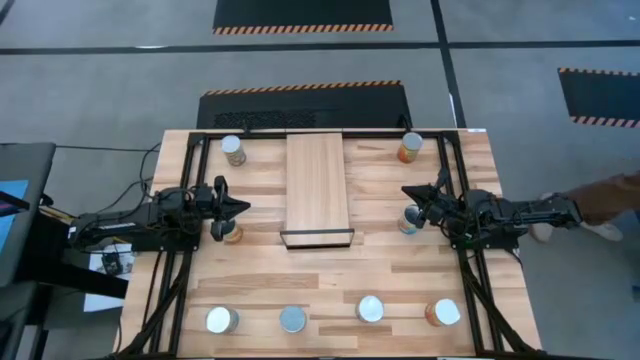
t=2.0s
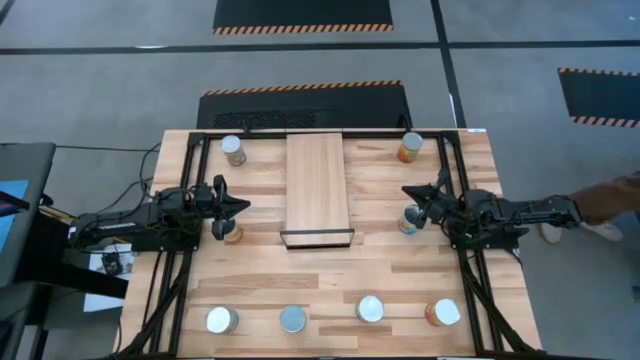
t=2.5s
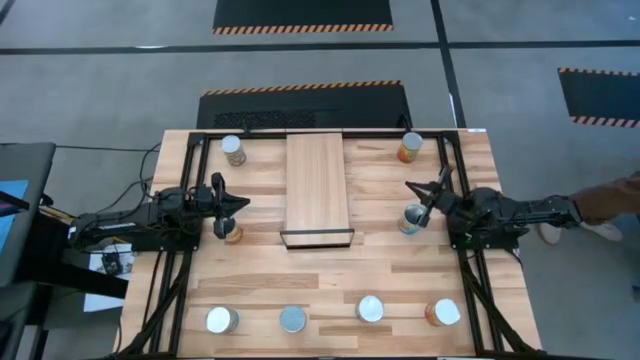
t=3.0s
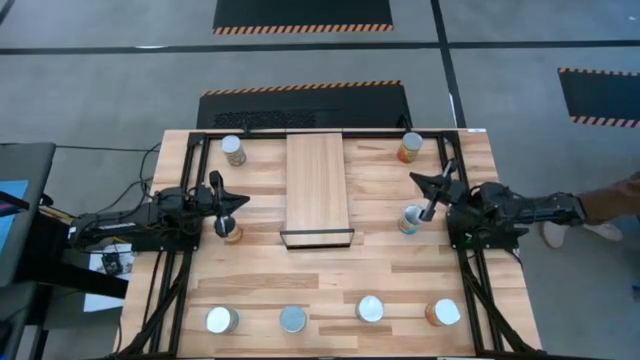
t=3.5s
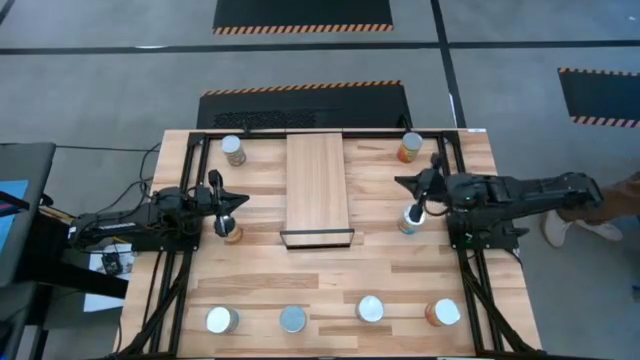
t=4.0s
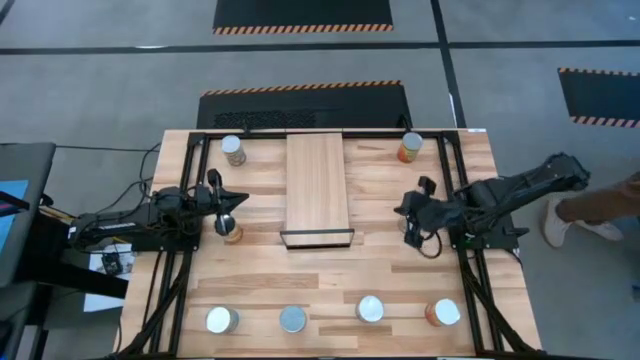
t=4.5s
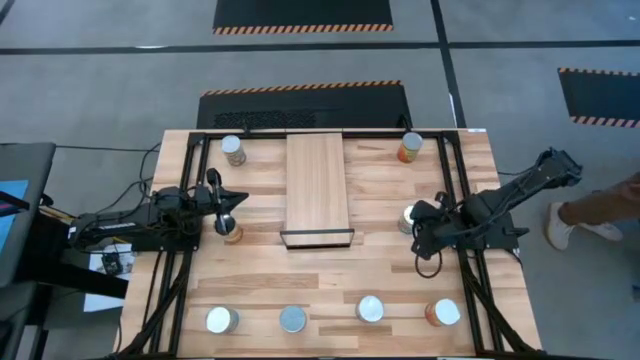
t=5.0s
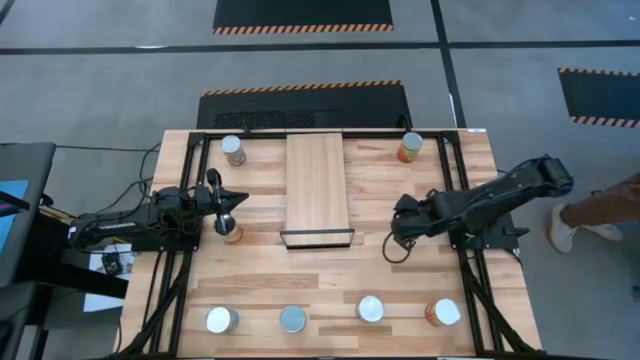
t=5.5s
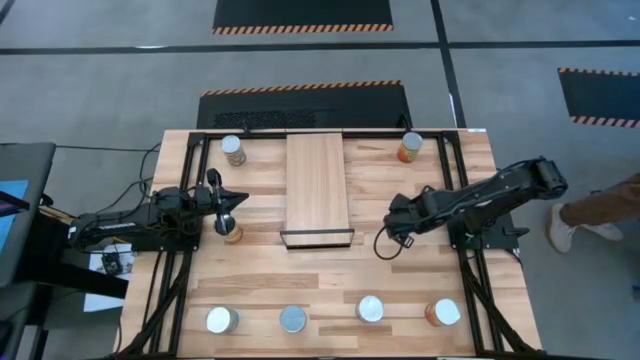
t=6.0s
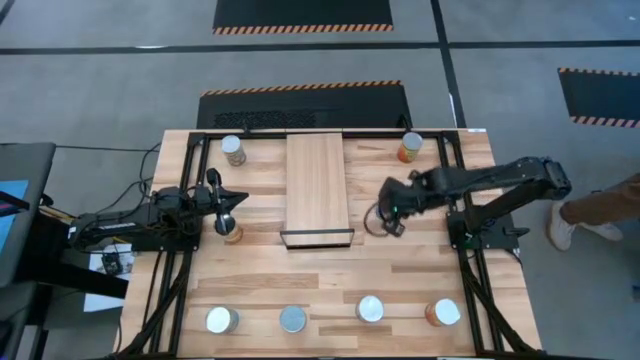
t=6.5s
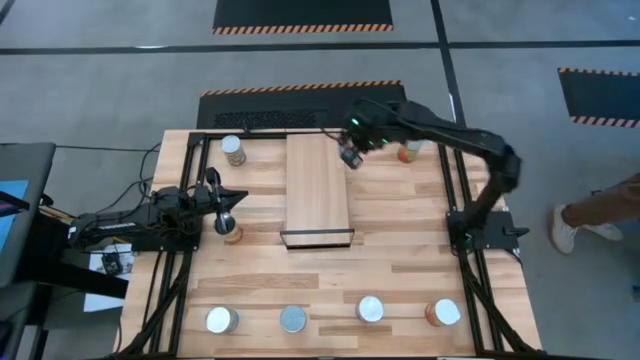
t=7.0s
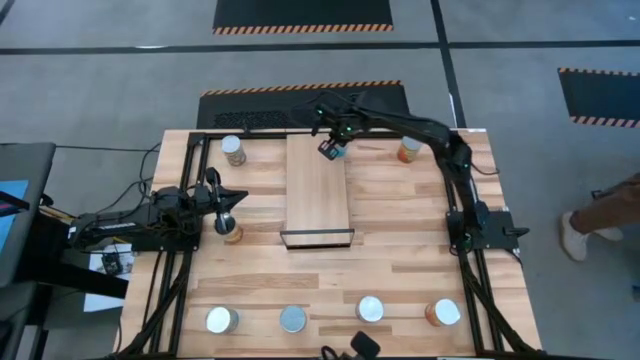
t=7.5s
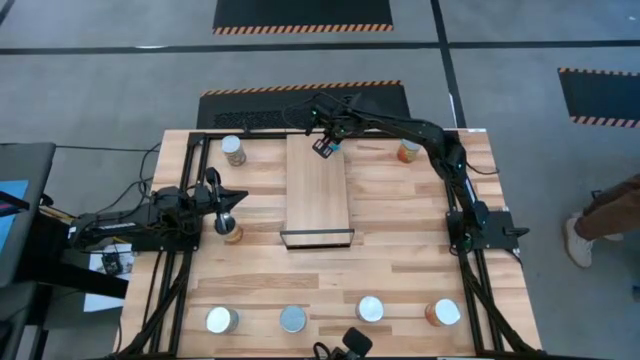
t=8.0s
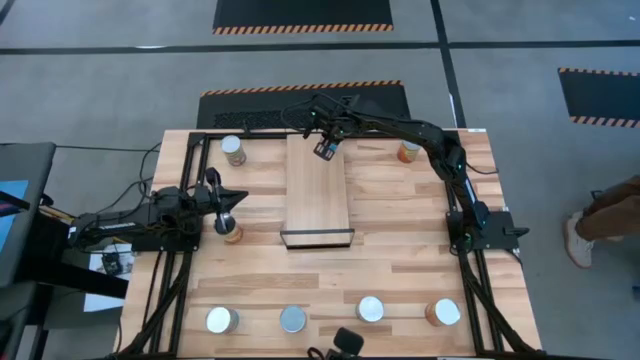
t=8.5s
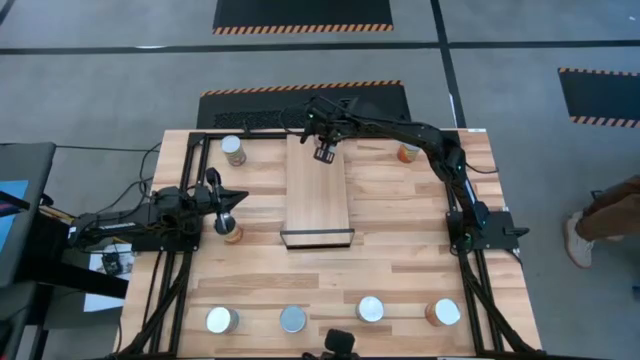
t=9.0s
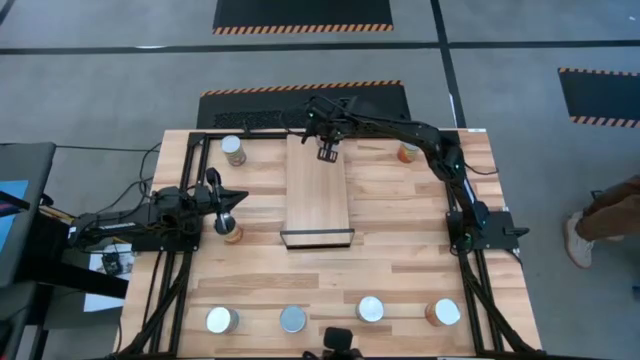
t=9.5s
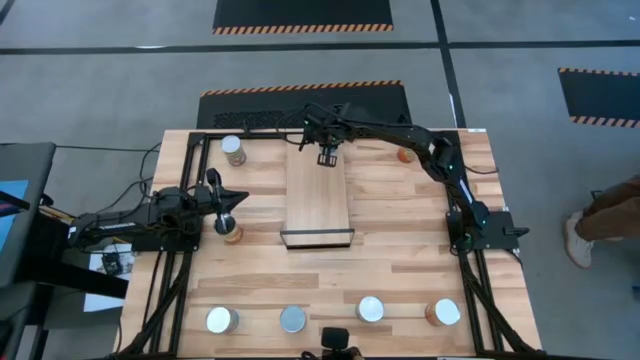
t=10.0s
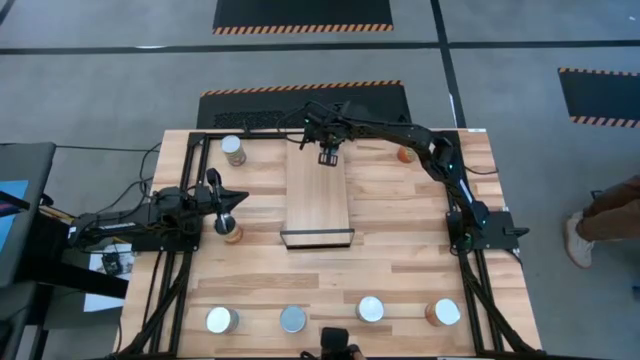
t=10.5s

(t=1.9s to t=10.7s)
Task: Pick and place cans onto a shelf
Put the top canned tomatoes on the shelf

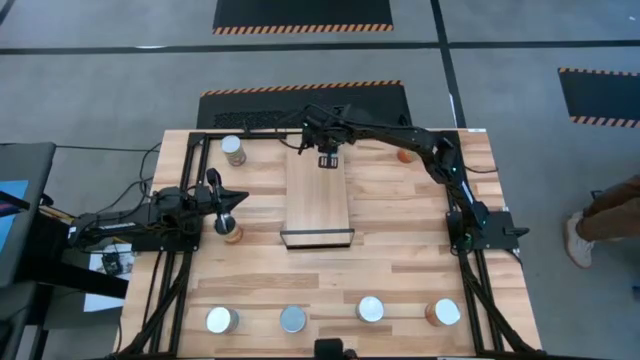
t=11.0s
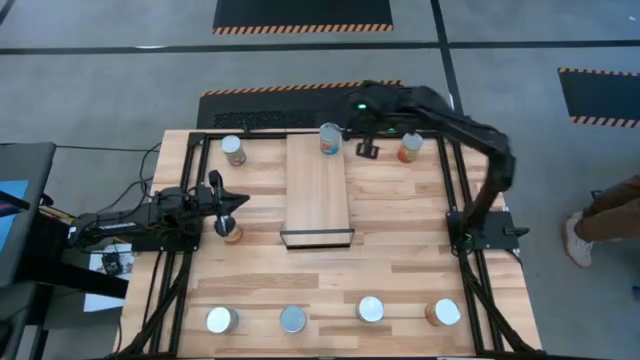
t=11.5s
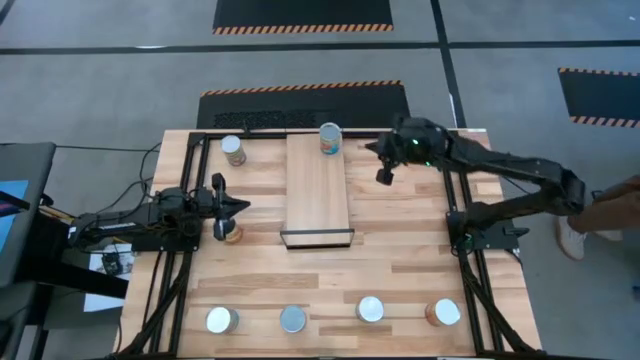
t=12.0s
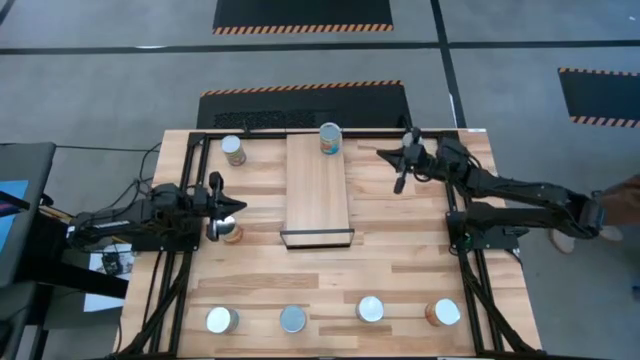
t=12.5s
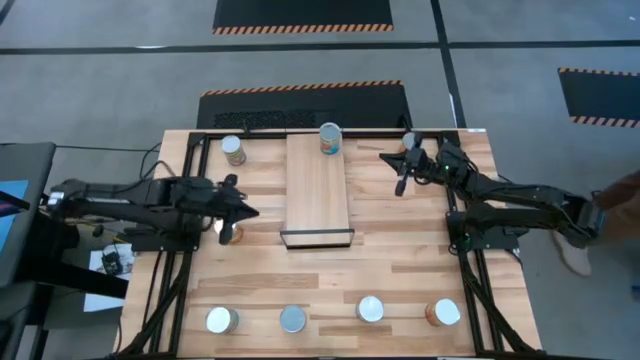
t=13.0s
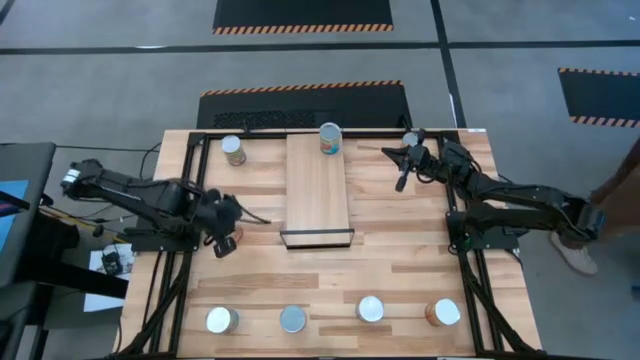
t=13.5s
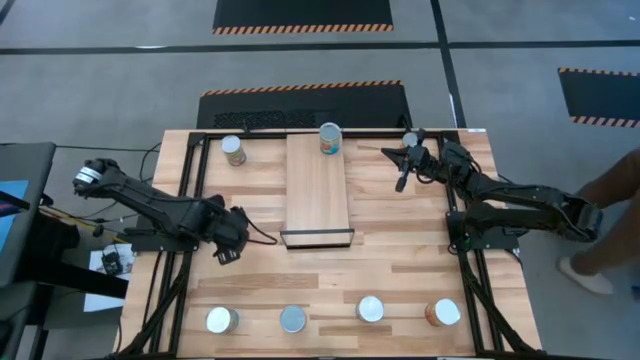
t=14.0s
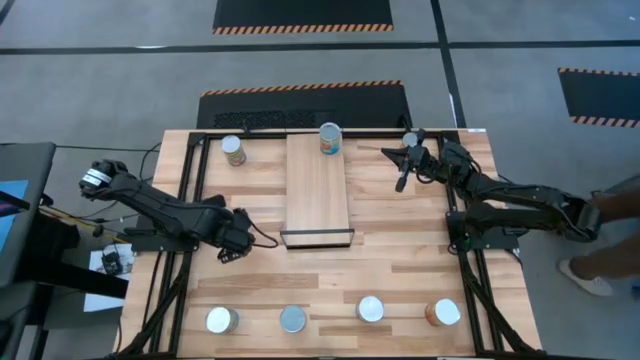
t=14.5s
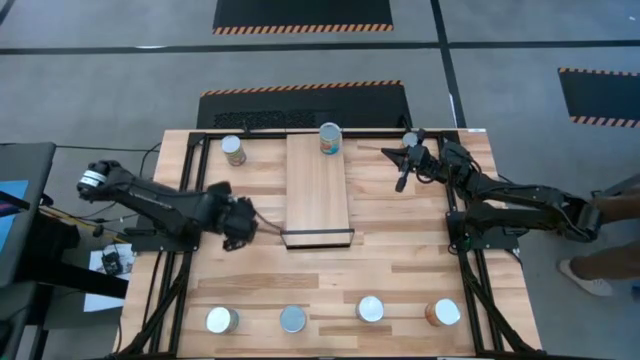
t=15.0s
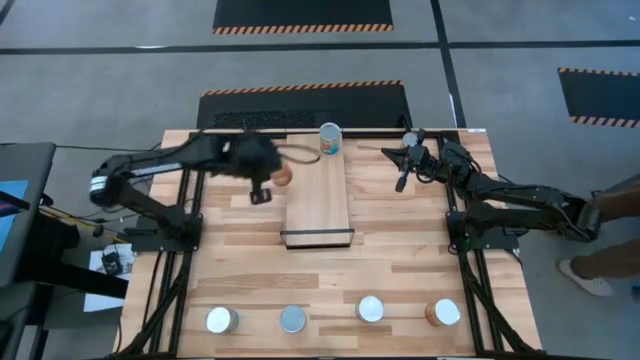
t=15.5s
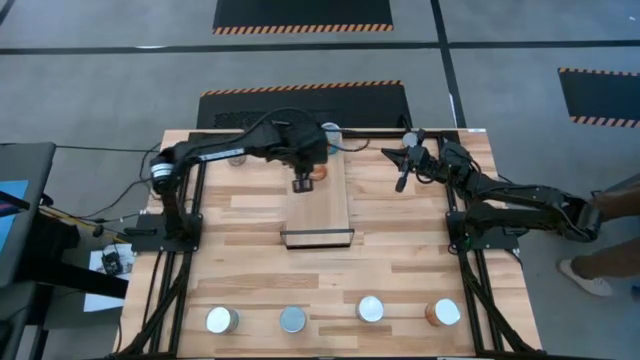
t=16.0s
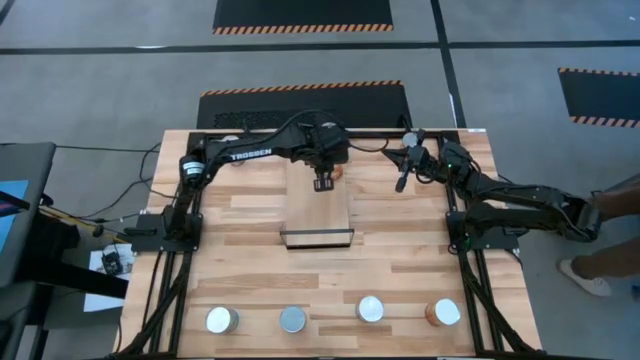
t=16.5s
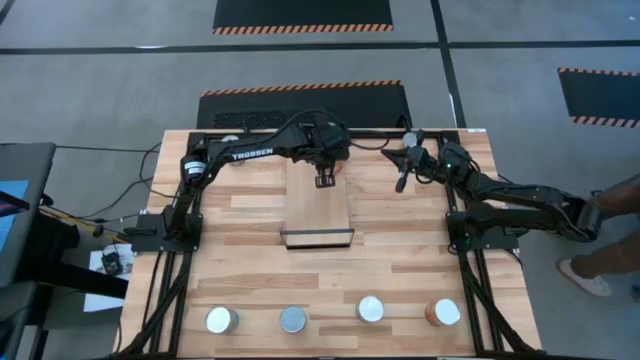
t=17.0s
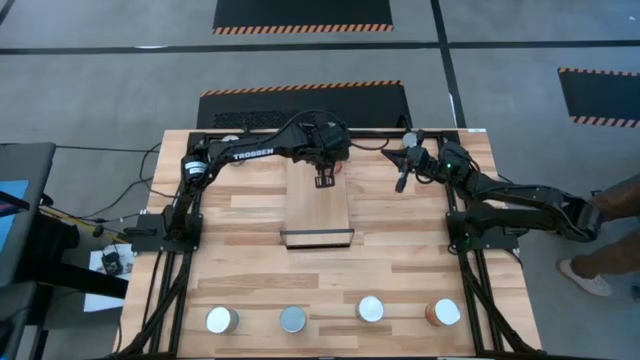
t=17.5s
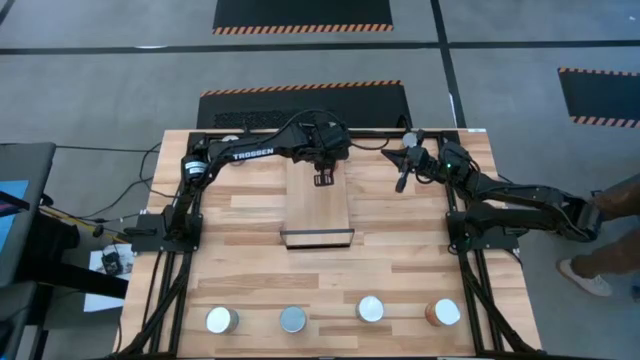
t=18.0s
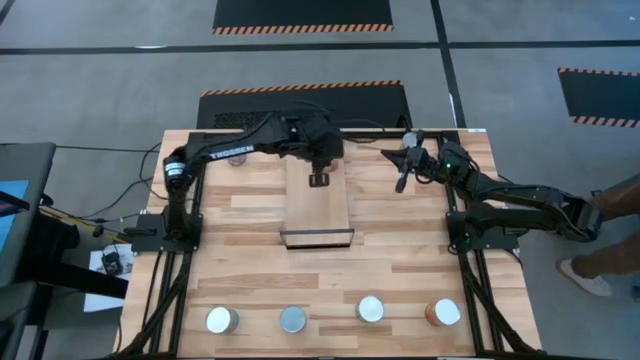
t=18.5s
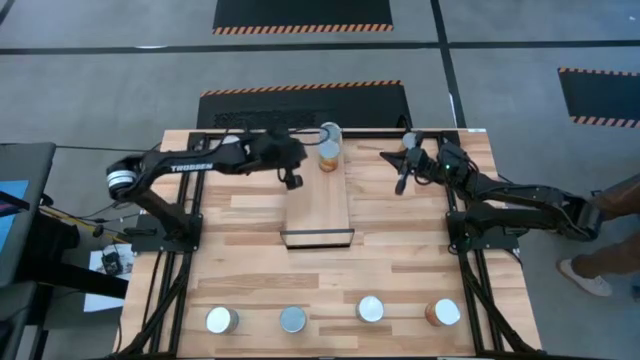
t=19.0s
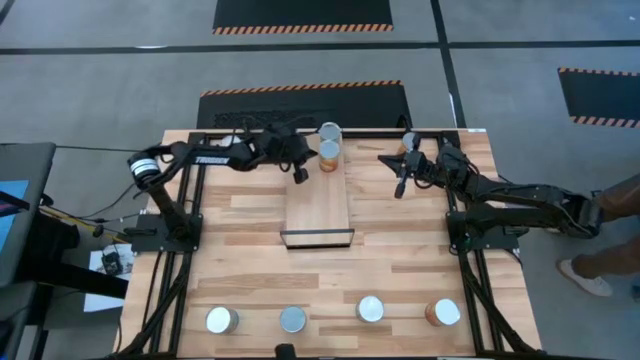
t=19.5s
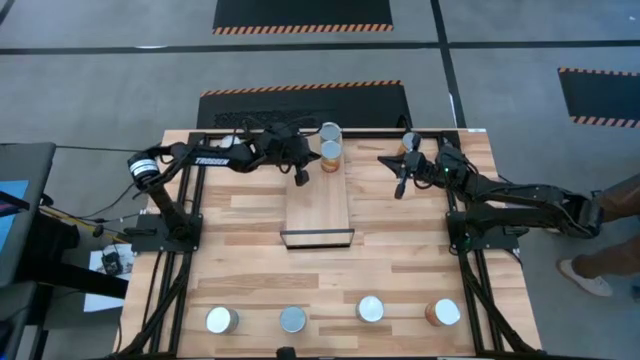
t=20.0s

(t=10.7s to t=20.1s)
Put the top canned corn on the shelf

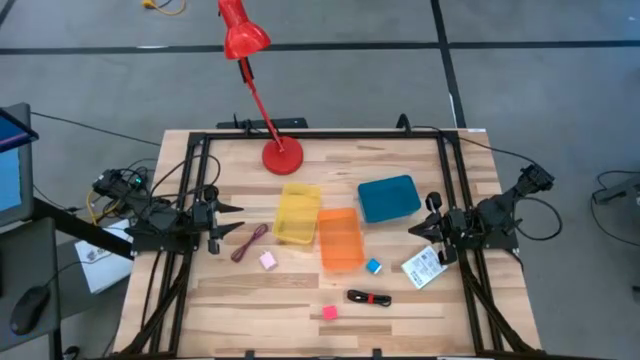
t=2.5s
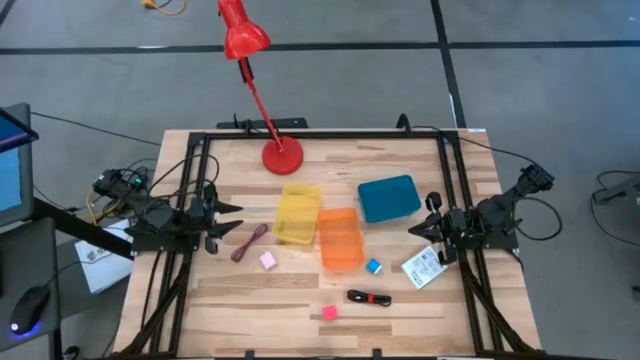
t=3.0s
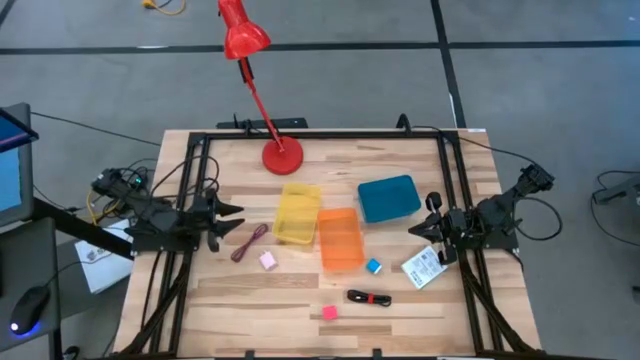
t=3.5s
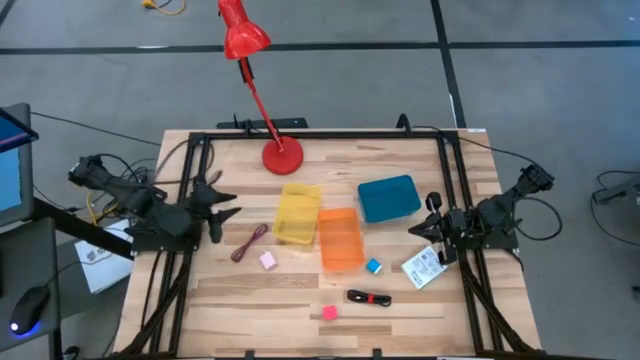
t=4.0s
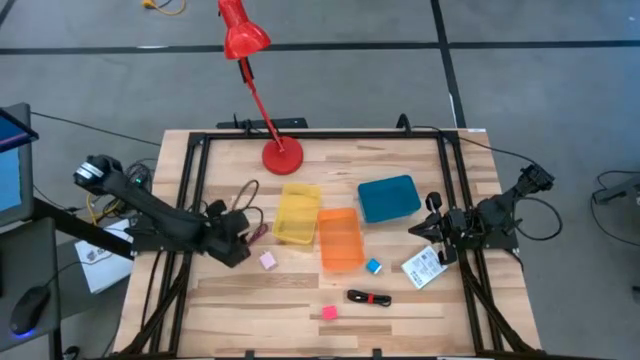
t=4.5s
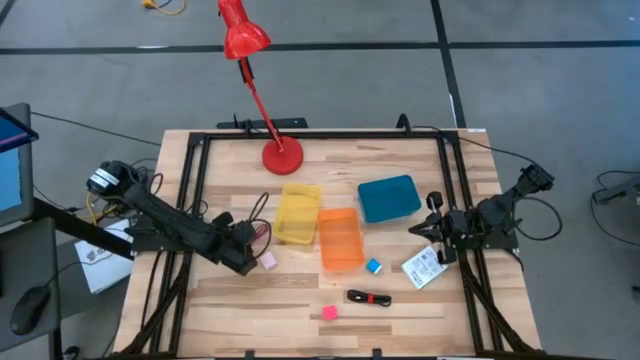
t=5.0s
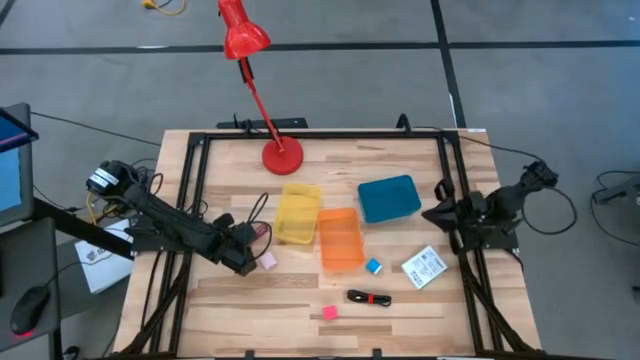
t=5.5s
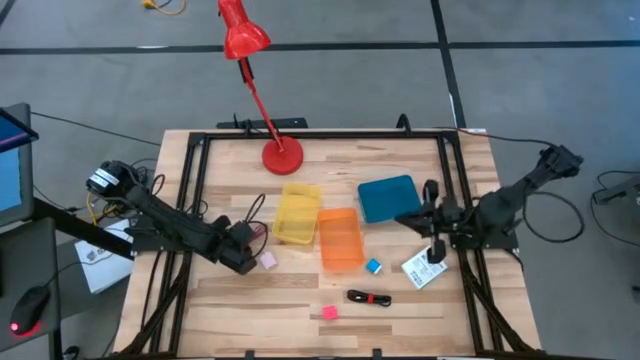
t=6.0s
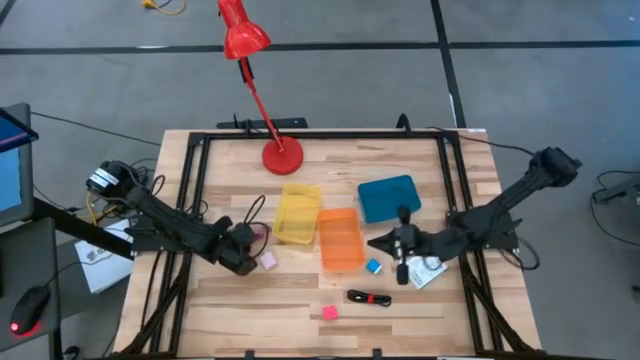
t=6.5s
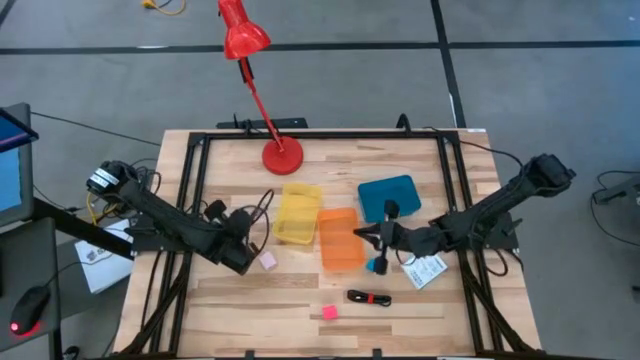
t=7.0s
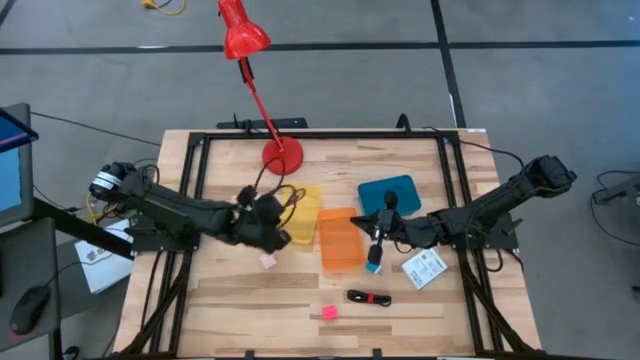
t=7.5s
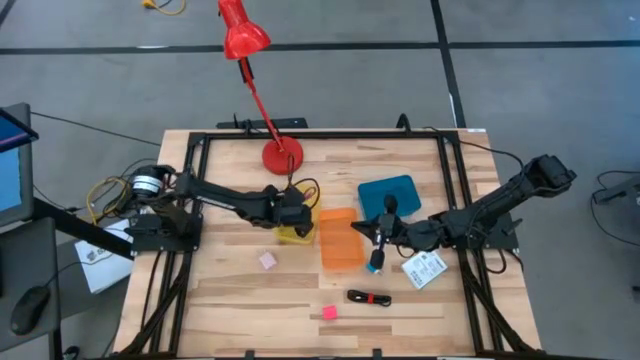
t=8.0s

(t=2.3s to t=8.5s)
Task: Pick and place items into bin
Put the pink charger cable into the yellow bin
